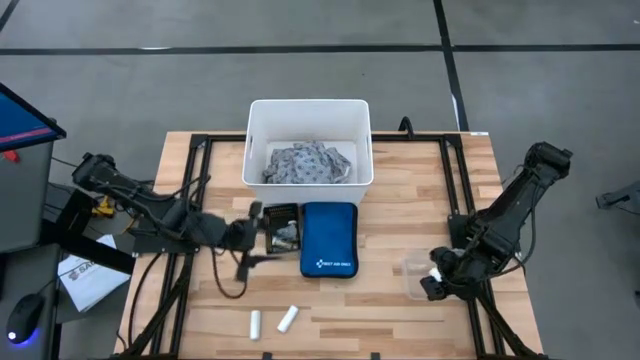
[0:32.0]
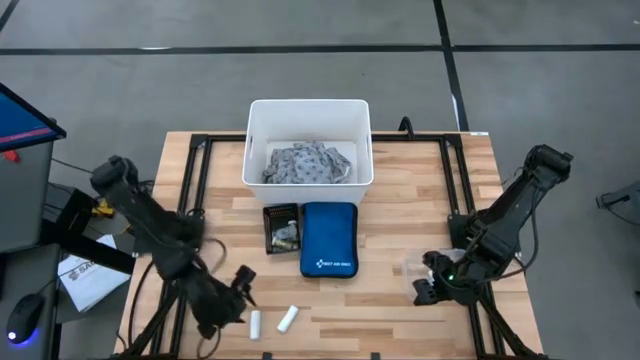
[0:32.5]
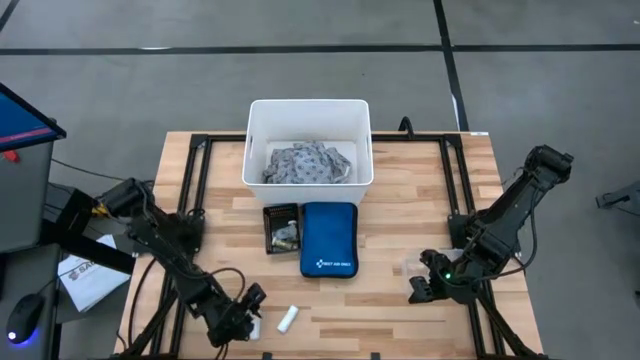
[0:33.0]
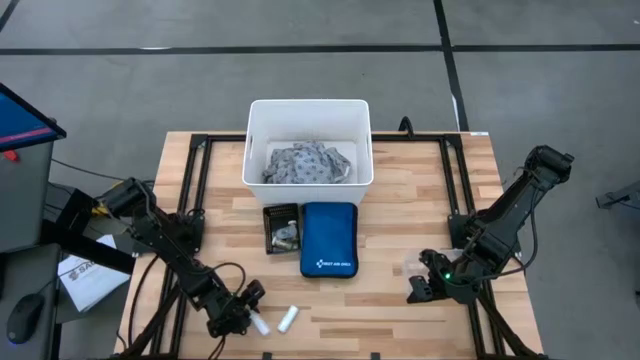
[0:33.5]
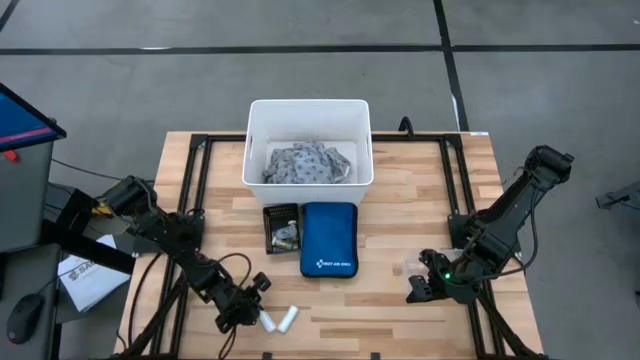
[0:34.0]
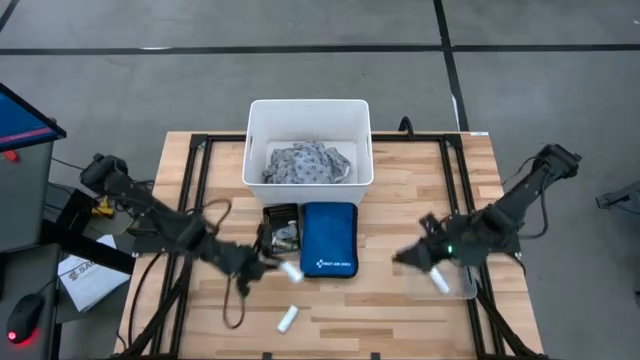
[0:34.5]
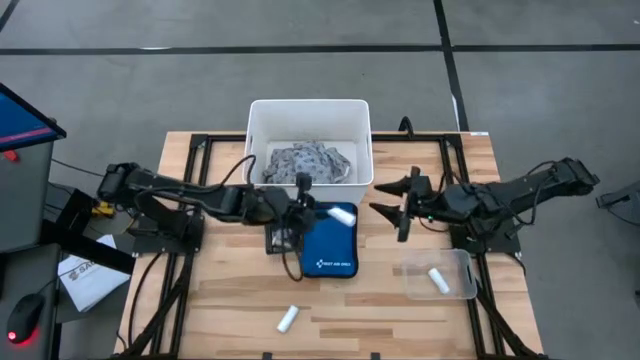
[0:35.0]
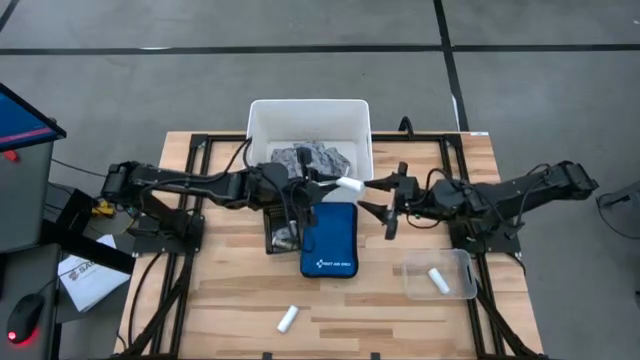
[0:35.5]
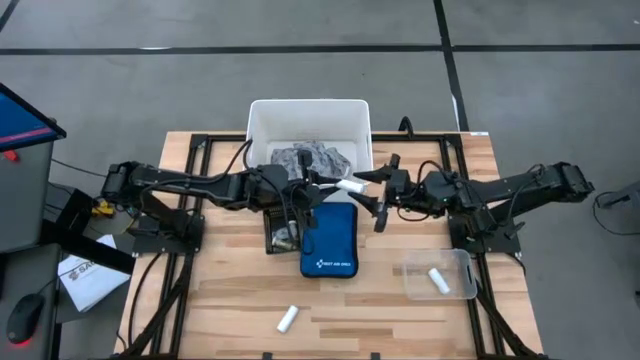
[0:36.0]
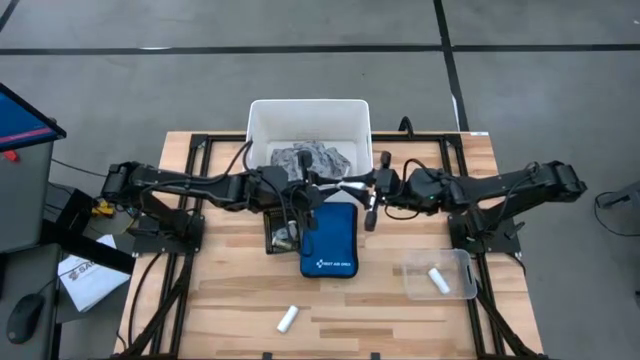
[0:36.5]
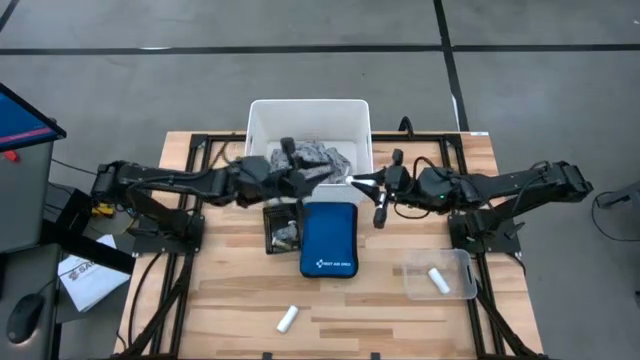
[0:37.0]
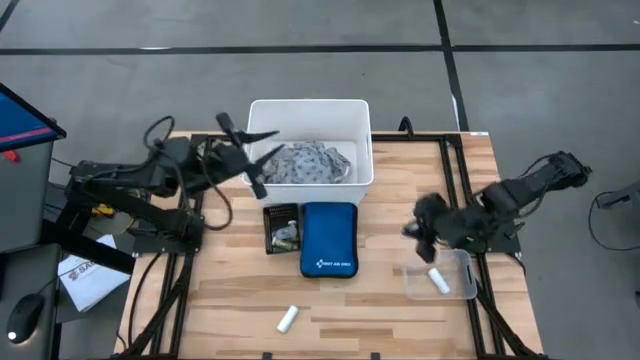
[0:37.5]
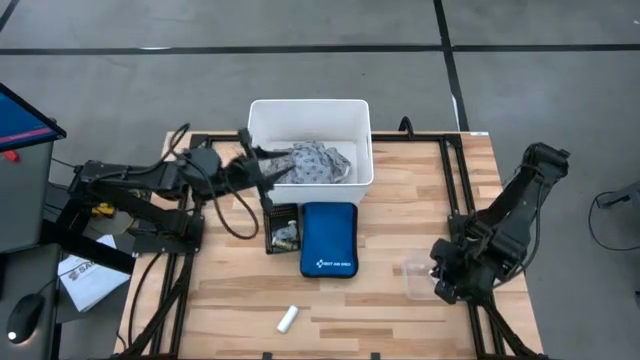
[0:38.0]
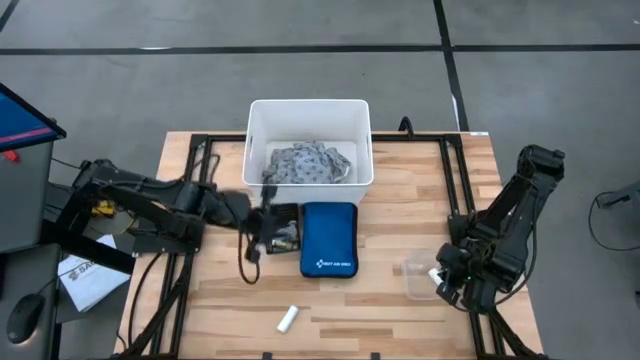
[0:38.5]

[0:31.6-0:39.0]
Task: Pick & place medical supplies in basket/bin
Put the left white rolled gauze into the transparent bin

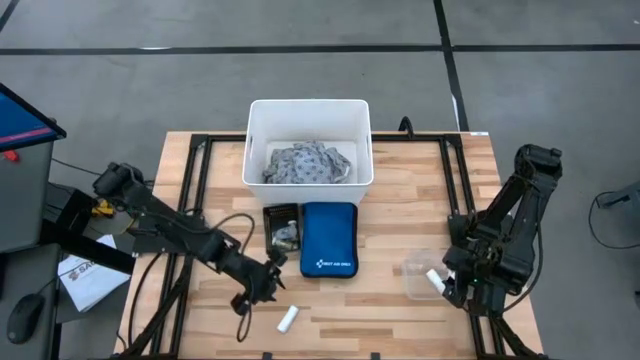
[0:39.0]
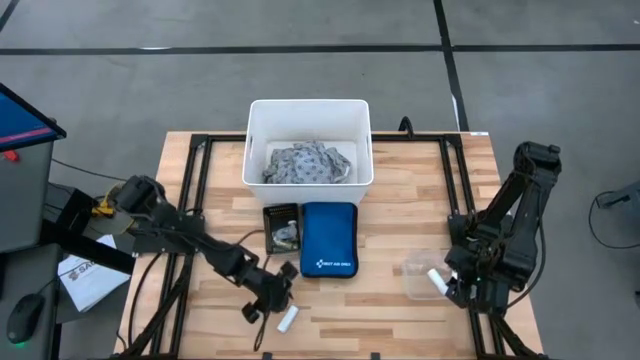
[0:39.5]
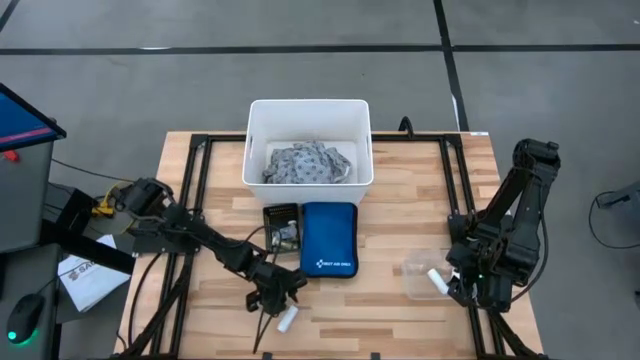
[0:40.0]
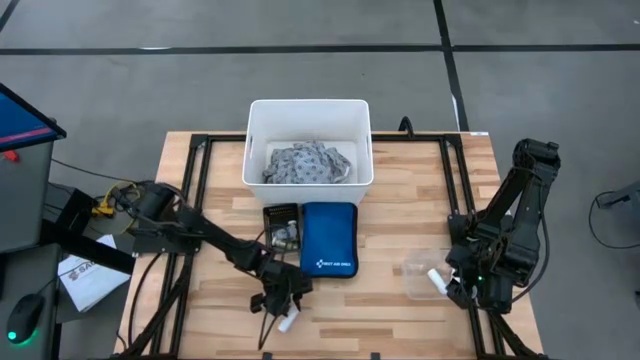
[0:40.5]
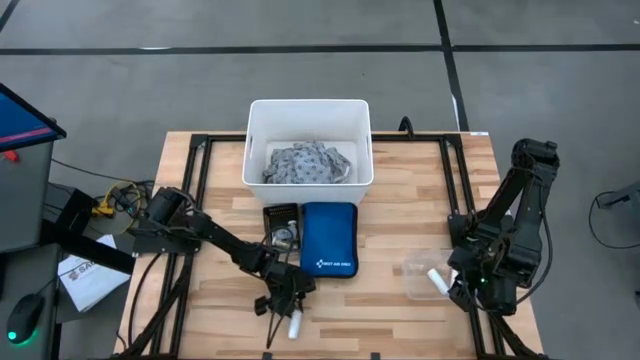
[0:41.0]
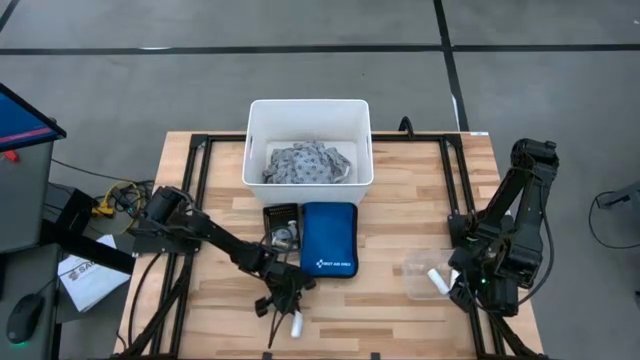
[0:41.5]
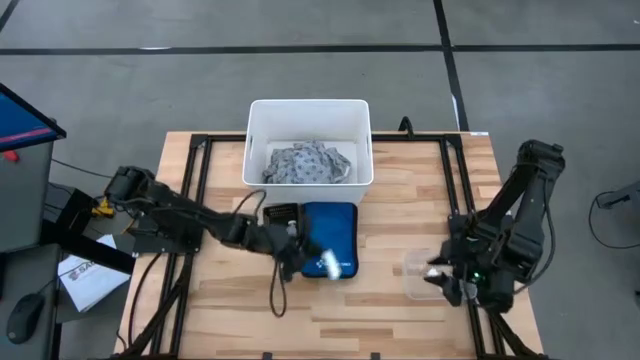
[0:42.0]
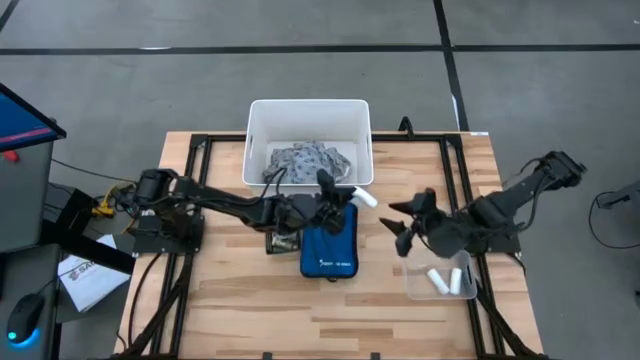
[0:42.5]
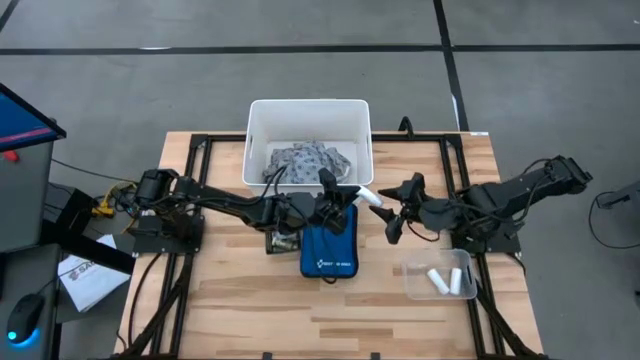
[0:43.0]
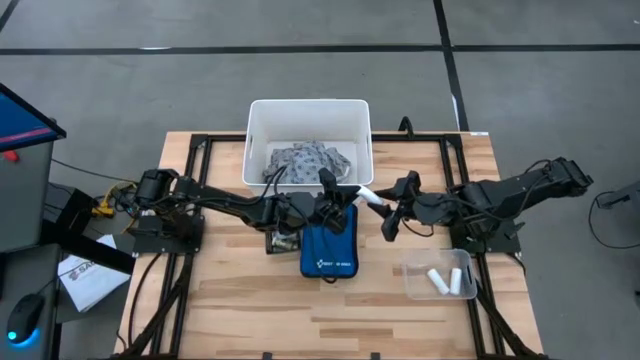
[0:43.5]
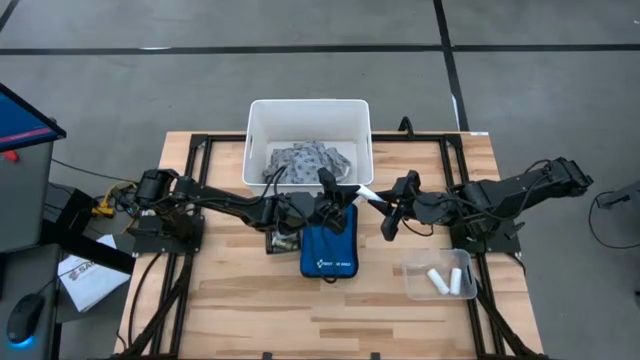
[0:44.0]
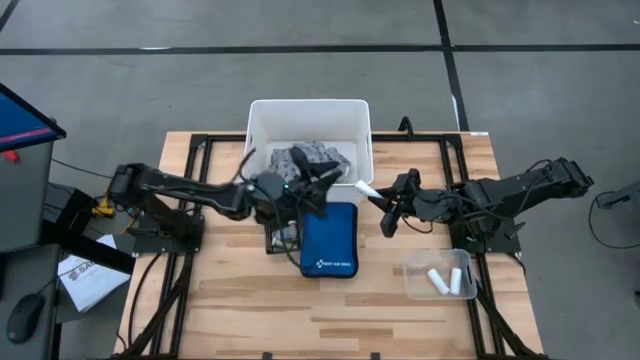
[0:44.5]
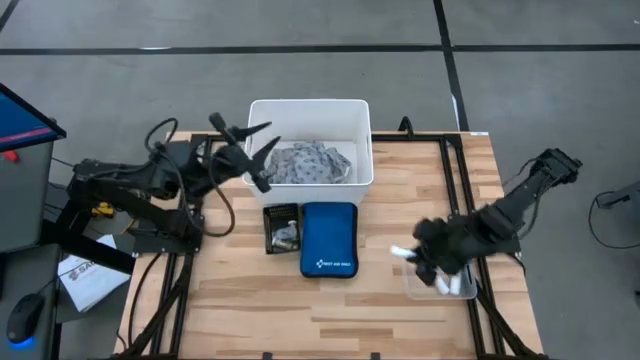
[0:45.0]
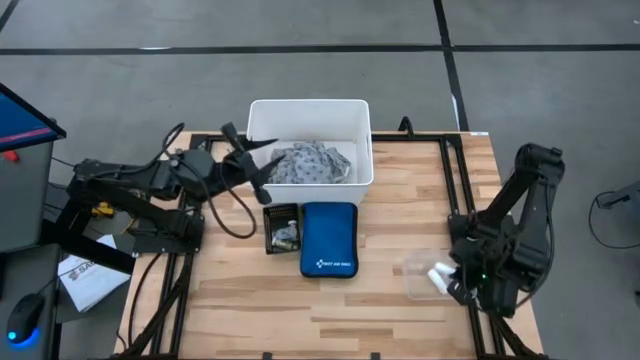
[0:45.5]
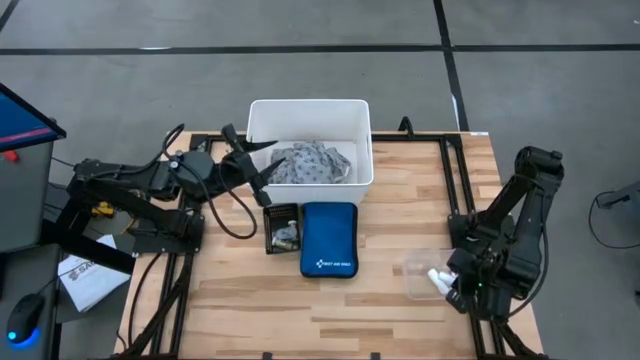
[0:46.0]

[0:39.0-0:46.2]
Put the white rolled gauze into the transparent bin

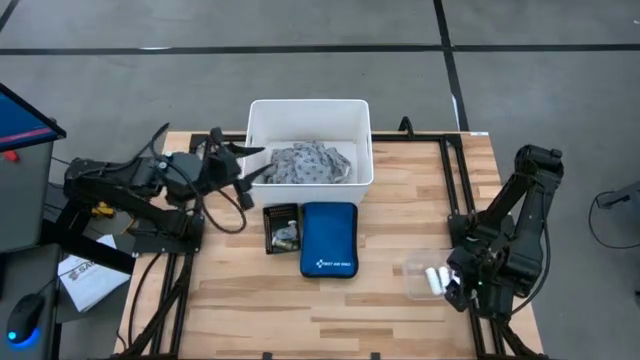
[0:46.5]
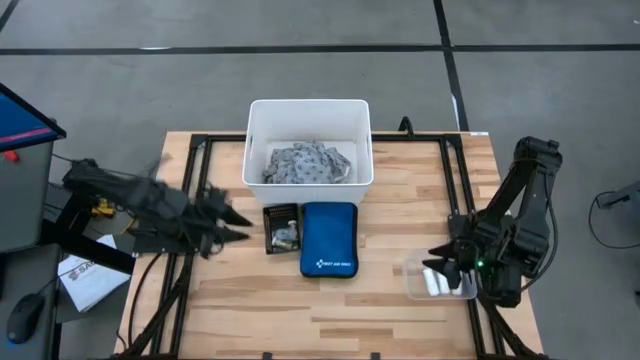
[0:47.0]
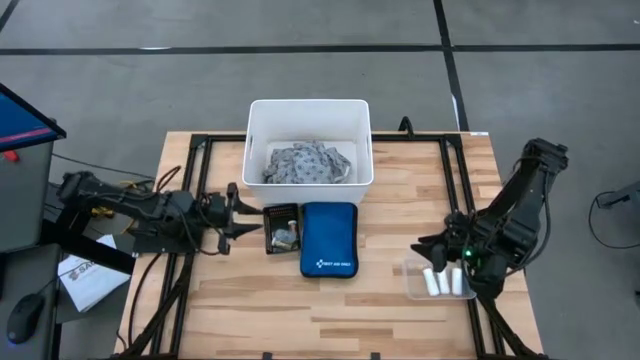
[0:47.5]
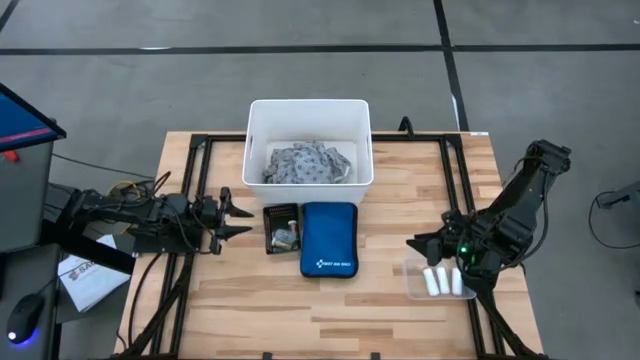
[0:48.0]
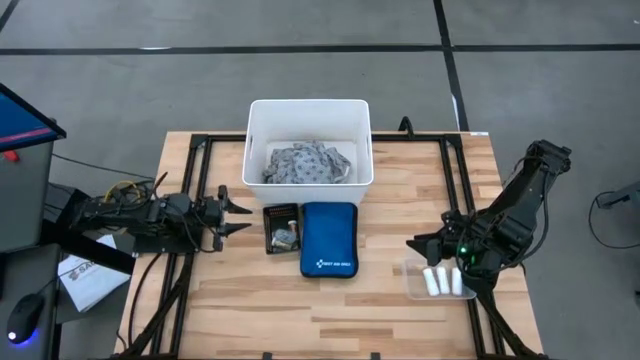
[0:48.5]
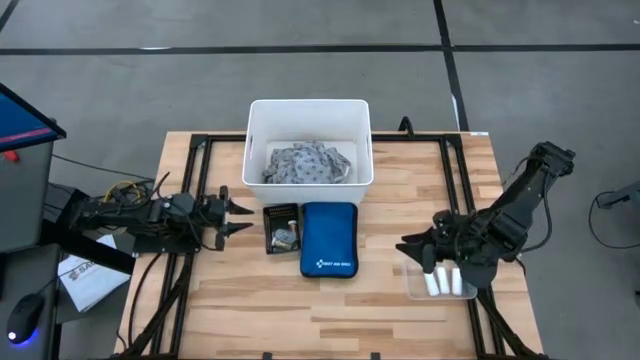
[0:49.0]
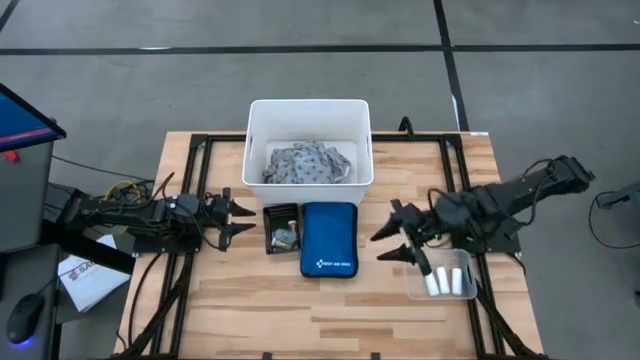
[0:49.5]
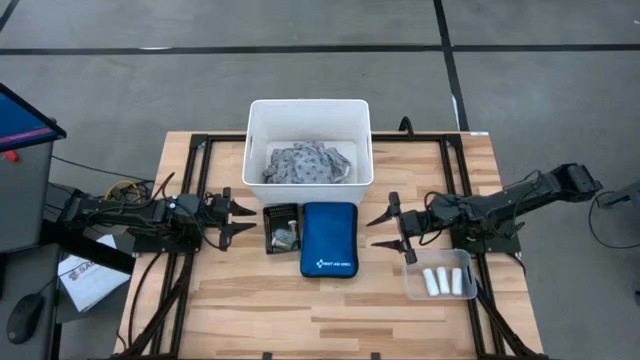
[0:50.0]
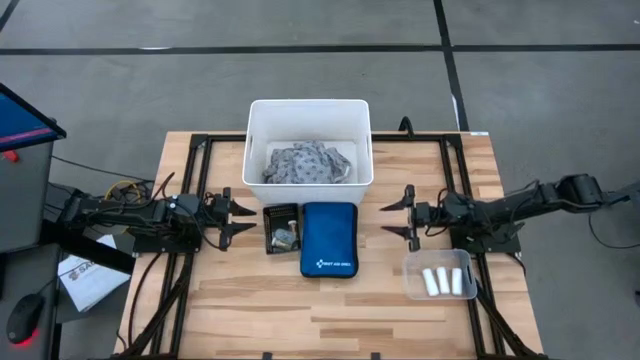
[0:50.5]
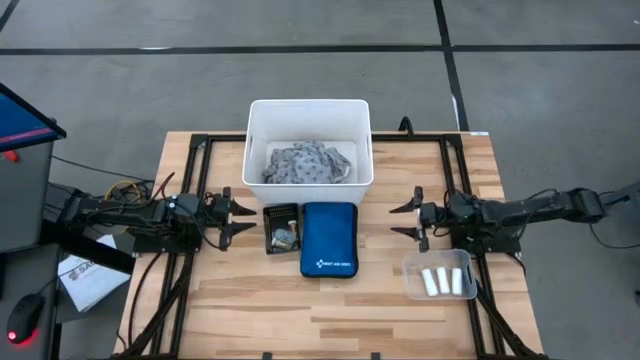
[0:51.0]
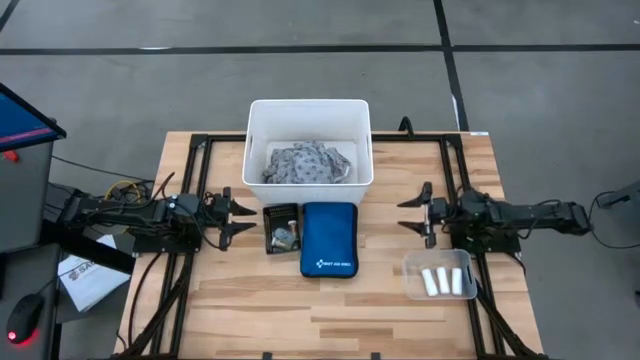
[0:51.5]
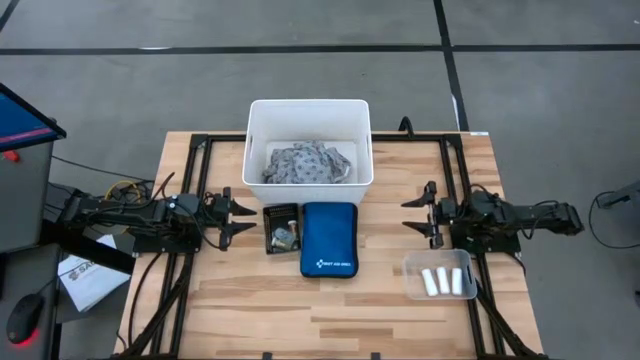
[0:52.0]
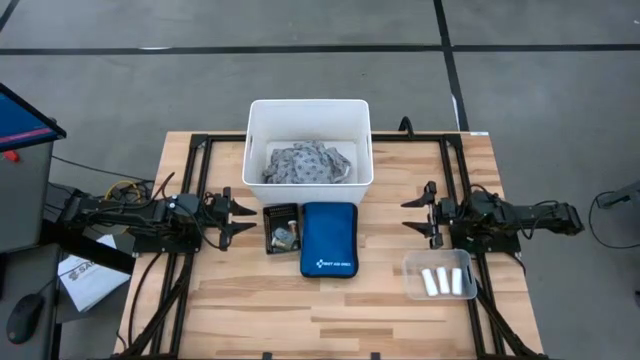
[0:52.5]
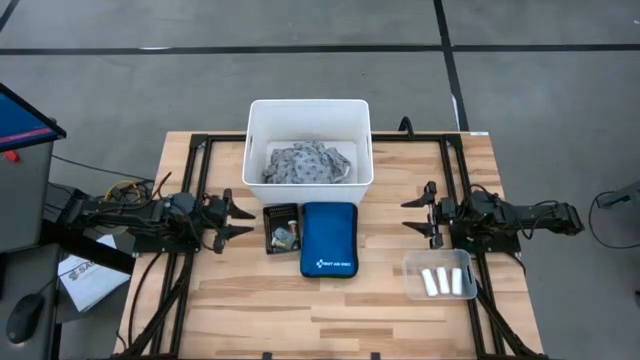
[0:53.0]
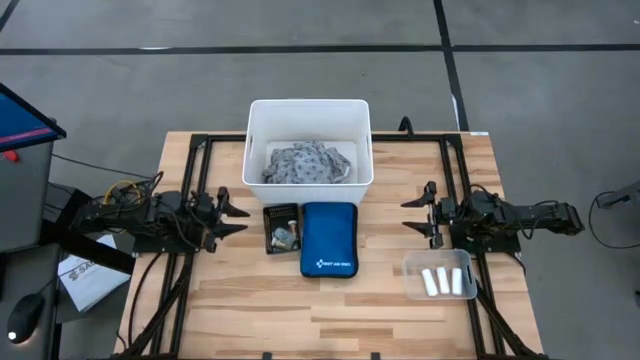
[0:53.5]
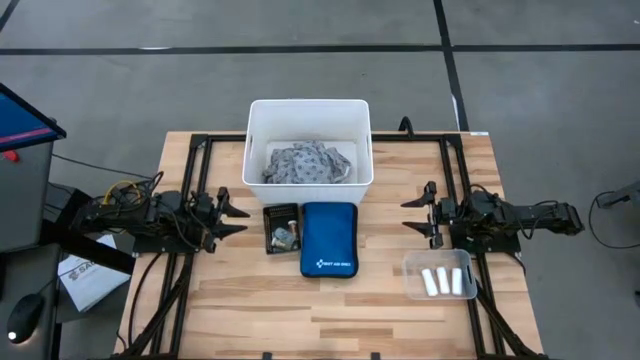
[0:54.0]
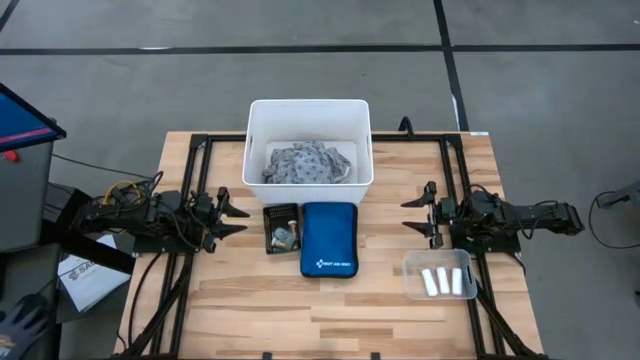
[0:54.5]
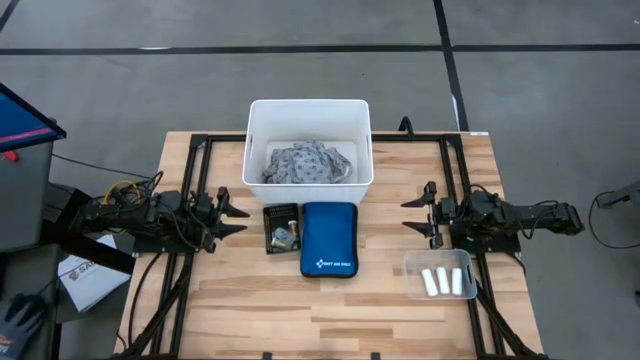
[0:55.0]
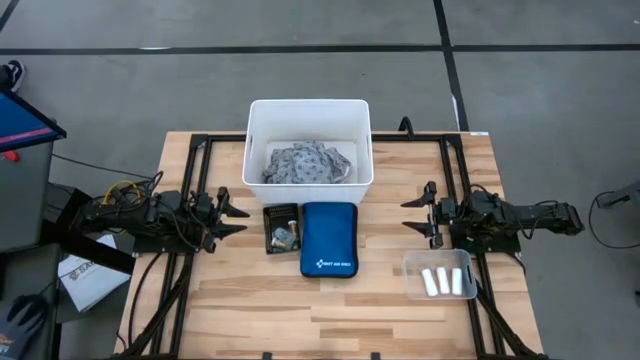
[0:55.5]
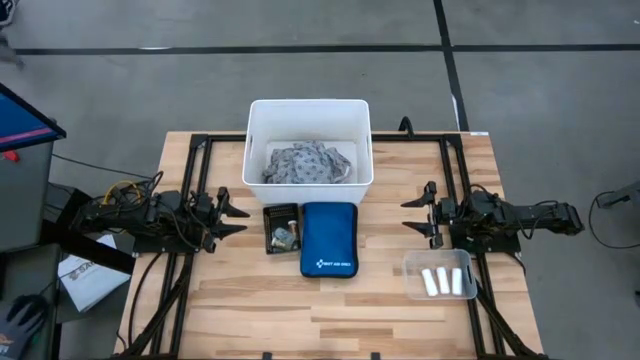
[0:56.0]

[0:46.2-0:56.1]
Return to Home Position
